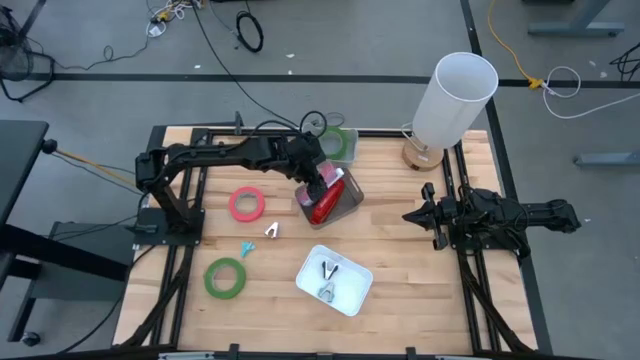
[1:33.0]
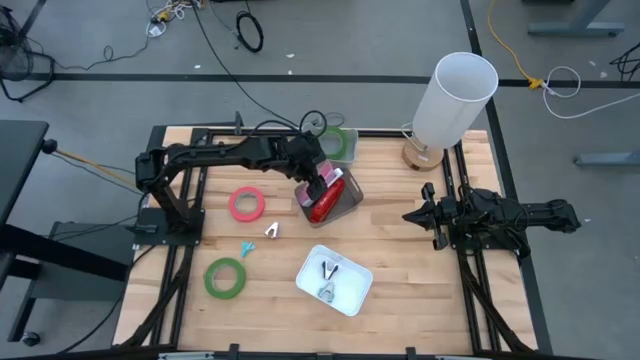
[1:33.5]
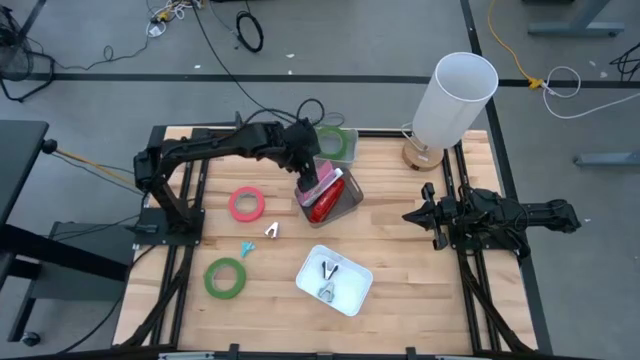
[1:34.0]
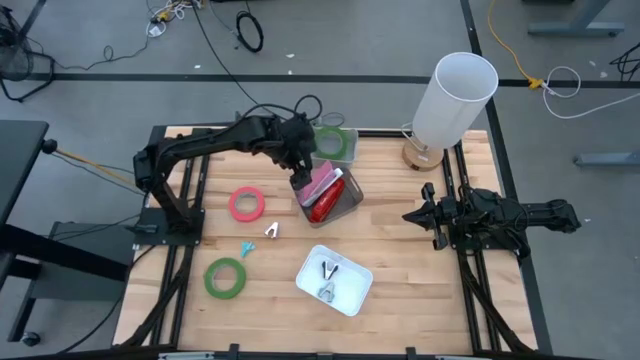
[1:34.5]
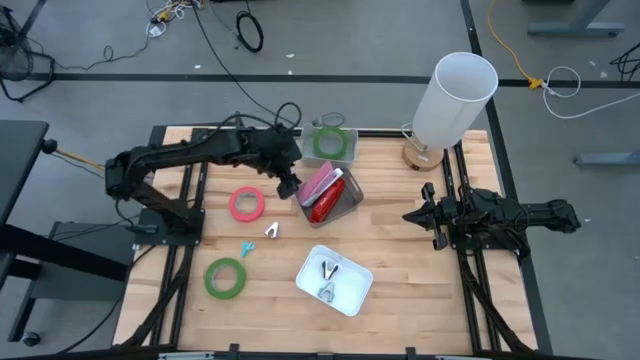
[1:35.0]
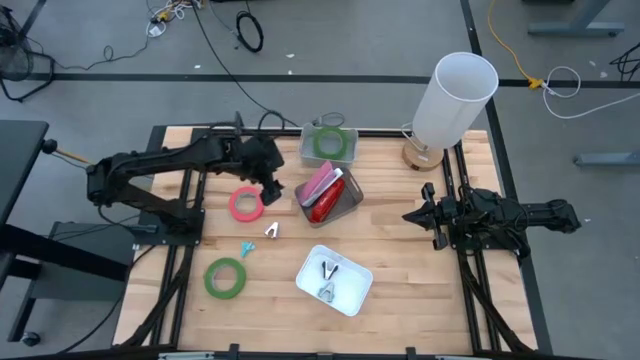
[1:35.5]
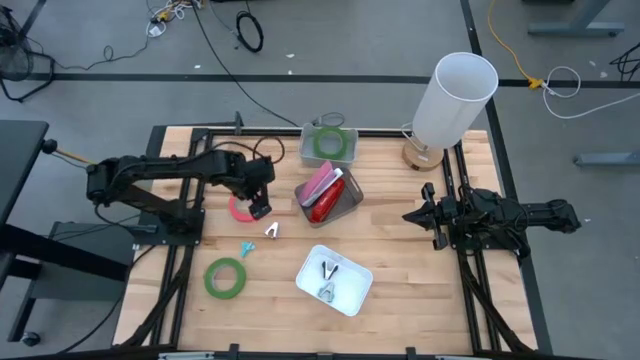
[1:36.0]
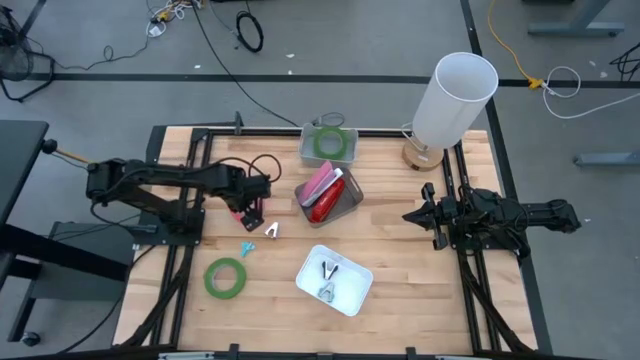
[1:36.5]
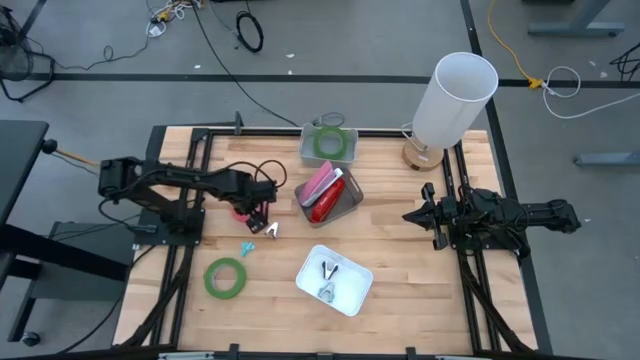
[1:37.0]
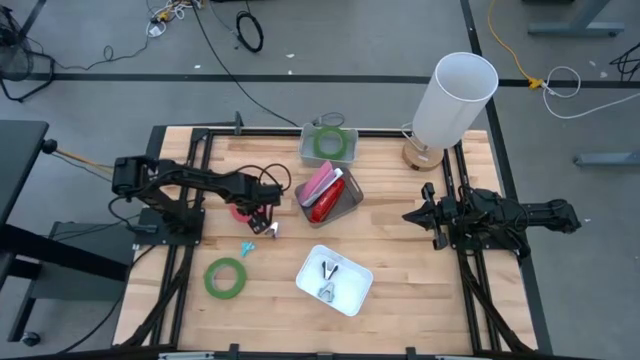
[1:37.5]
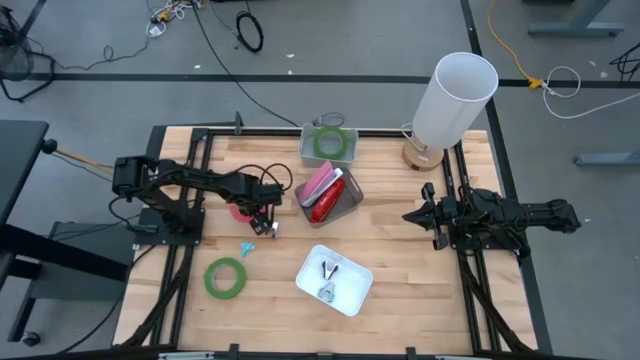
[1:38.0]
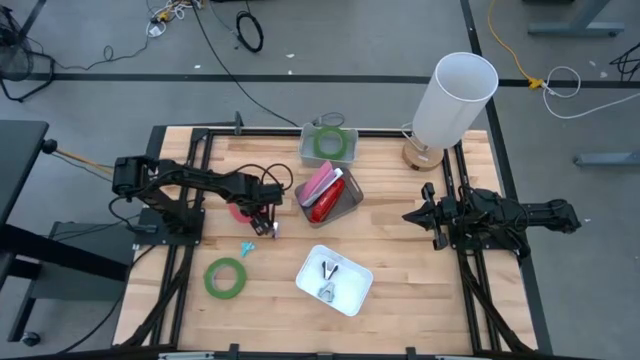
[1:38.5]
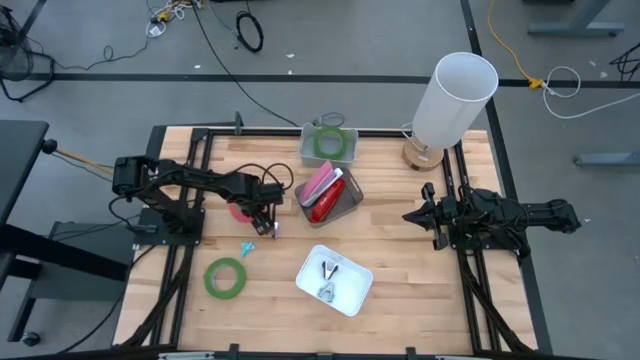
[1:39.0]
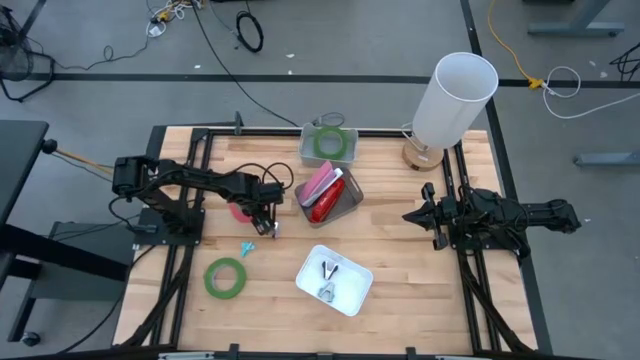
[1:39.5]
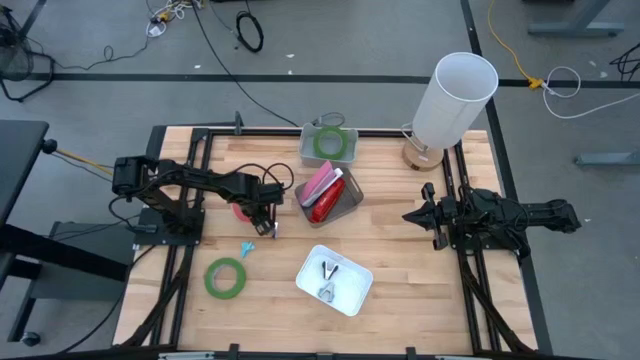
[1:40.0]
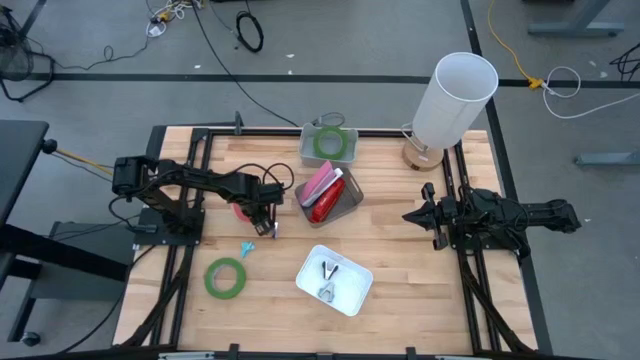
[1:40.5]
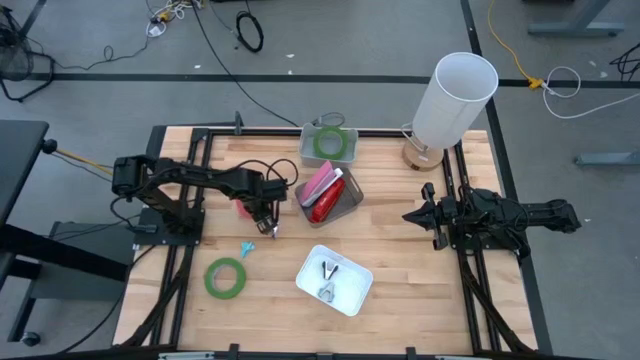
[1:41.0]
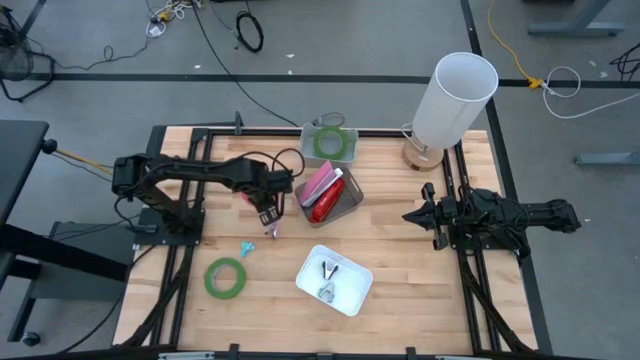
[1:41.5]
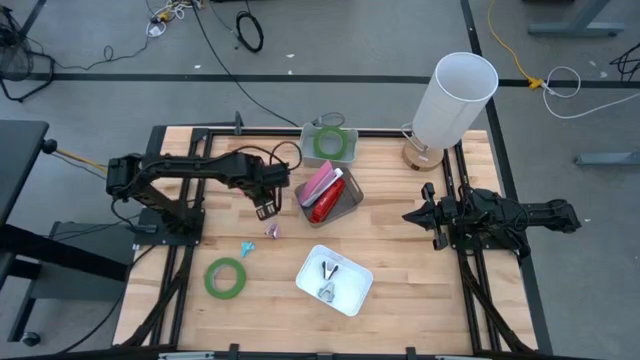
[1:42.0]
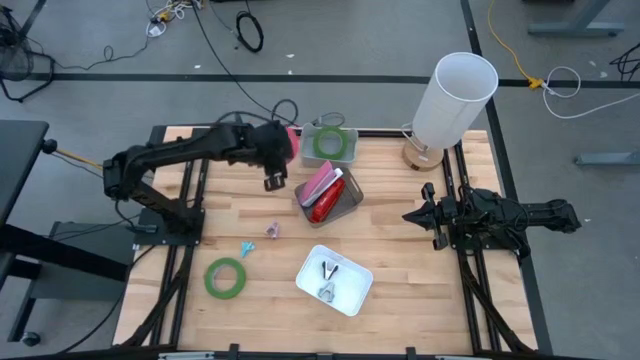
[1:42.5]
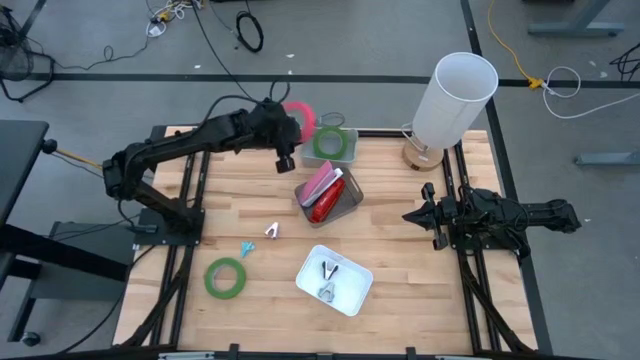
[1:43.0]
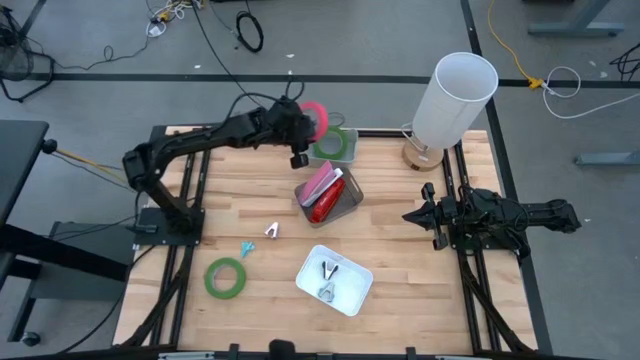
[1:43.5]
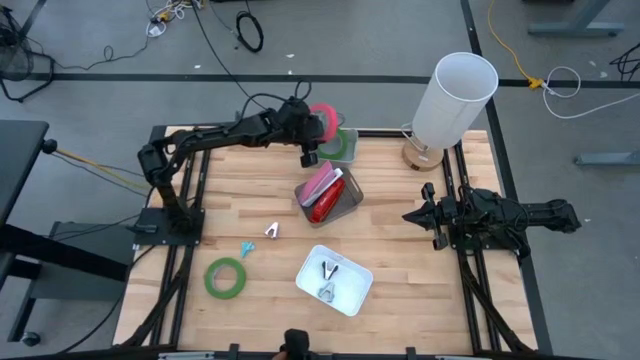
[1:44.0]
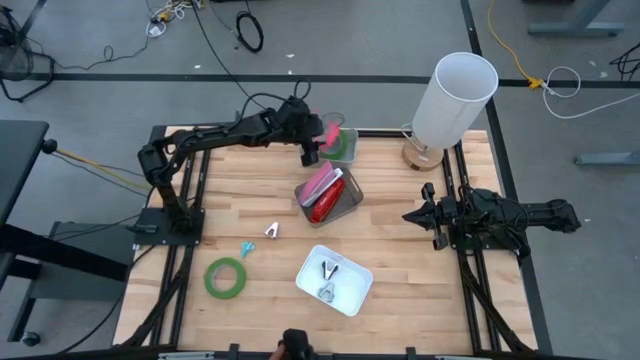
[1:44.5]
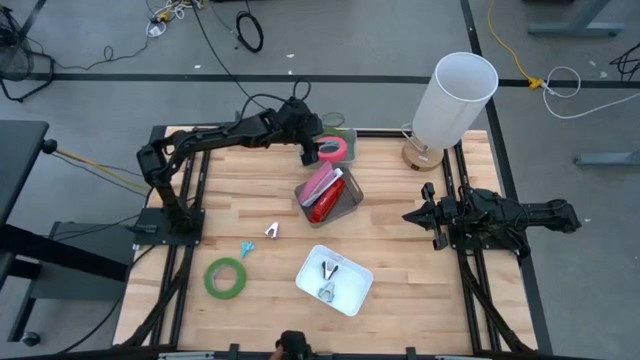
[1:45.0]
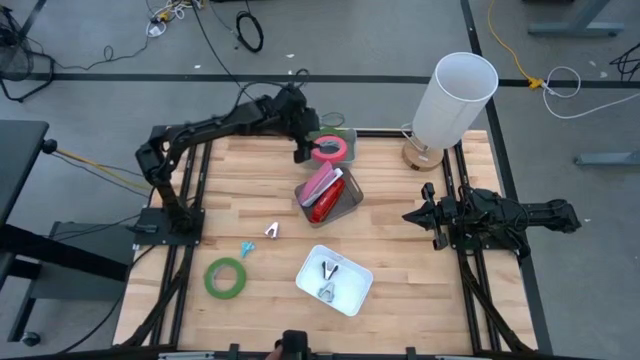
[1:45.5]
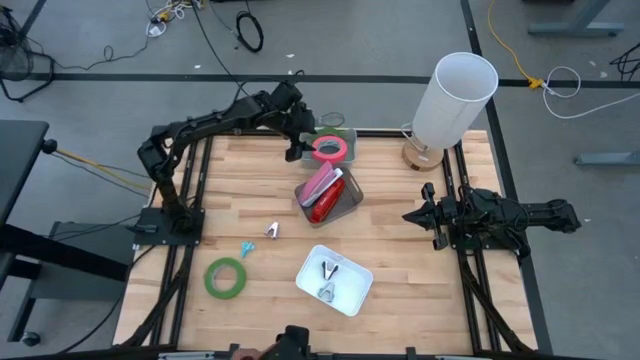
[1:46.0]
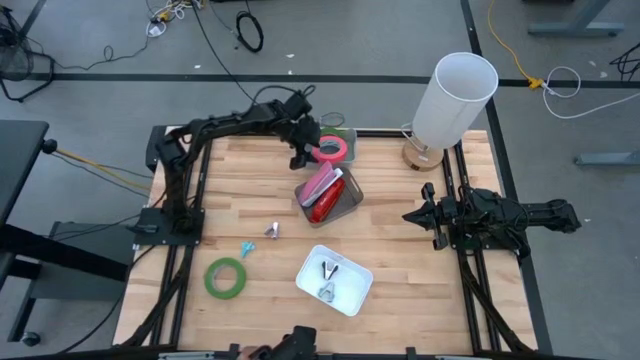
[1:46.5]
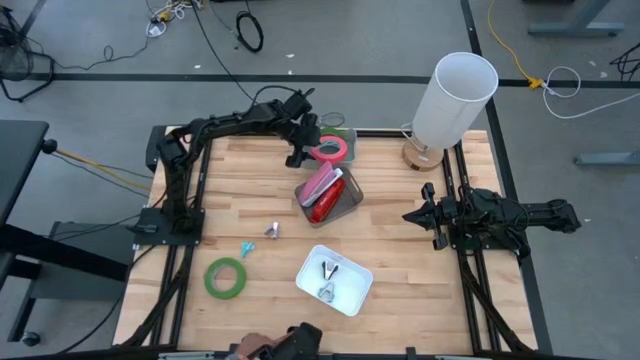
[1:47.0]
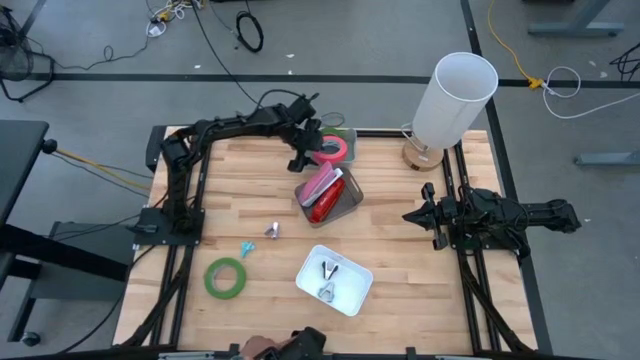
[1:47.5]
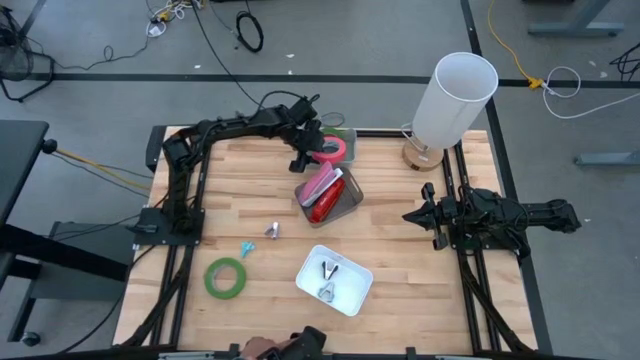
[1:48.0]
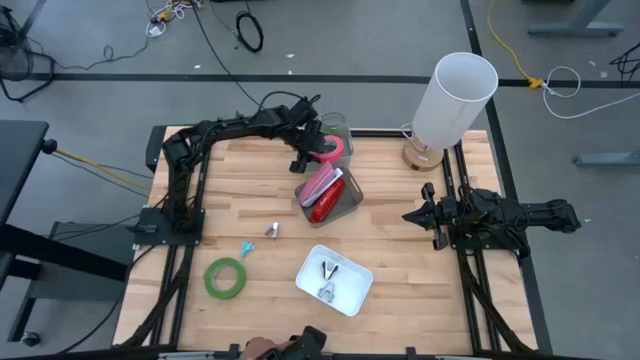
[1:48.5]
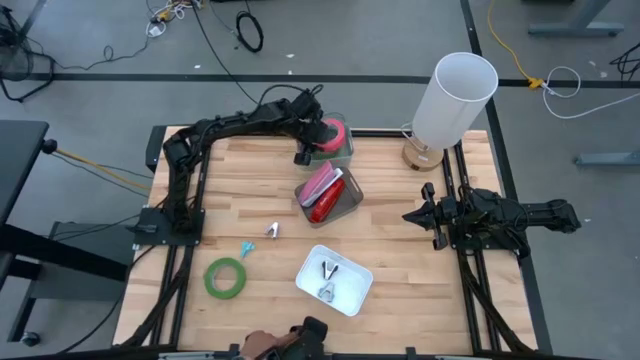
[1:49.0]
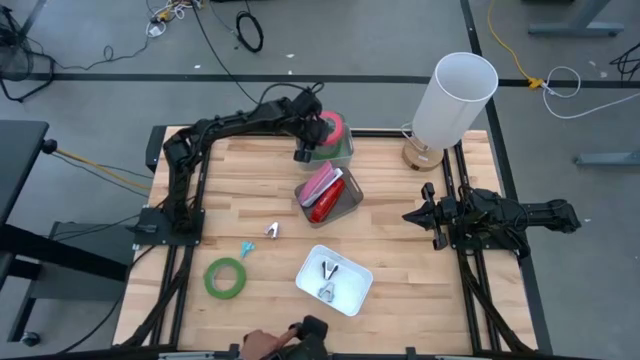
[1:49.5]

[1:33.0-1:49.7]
Task: Pick and place Stapler, Stapler remover, tape
Put the pink tape into the gray bin

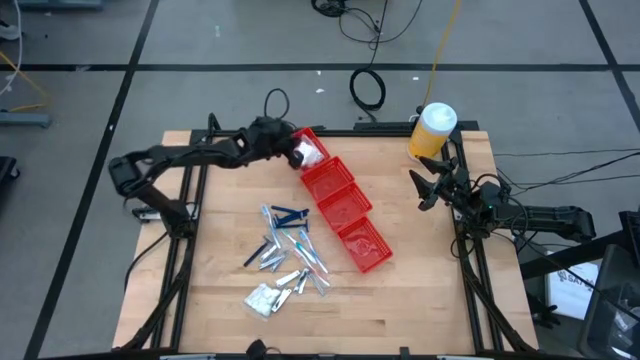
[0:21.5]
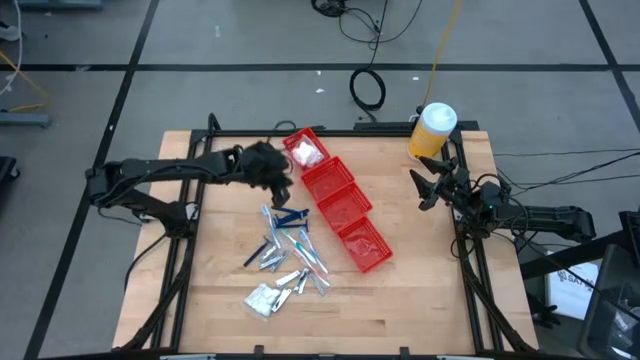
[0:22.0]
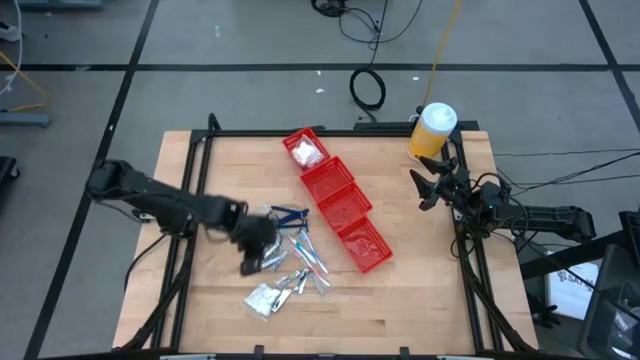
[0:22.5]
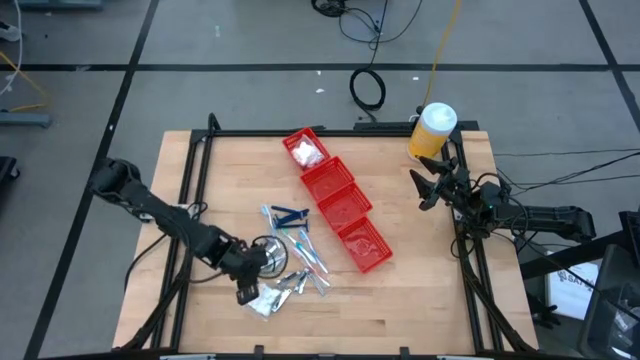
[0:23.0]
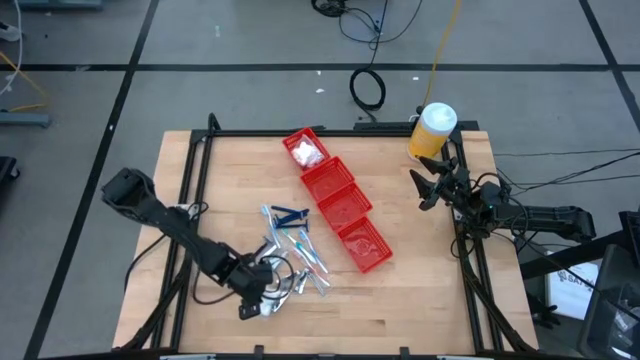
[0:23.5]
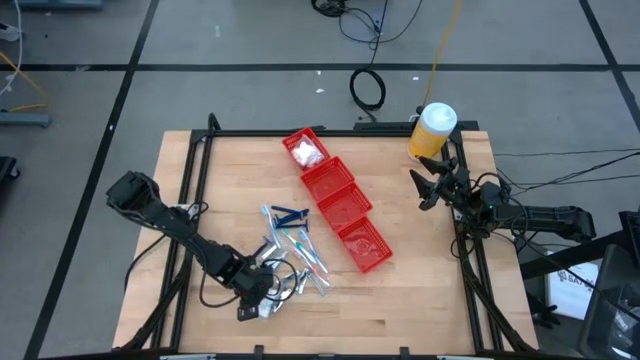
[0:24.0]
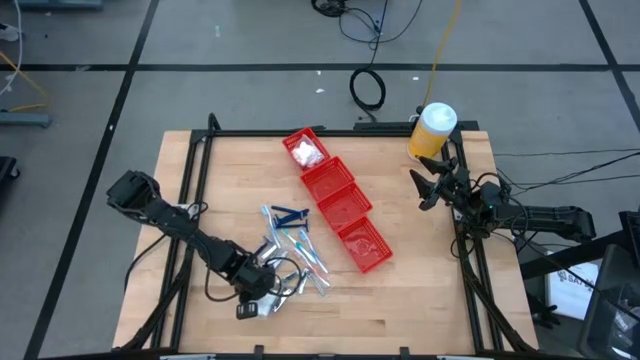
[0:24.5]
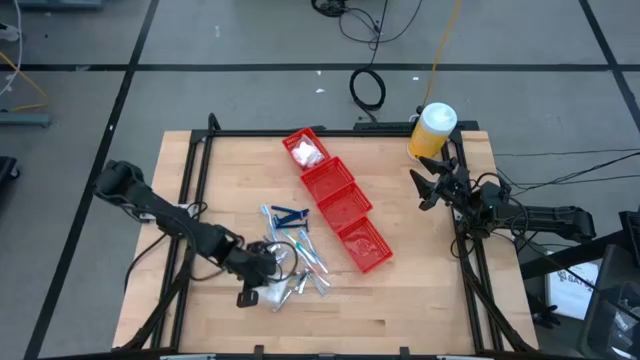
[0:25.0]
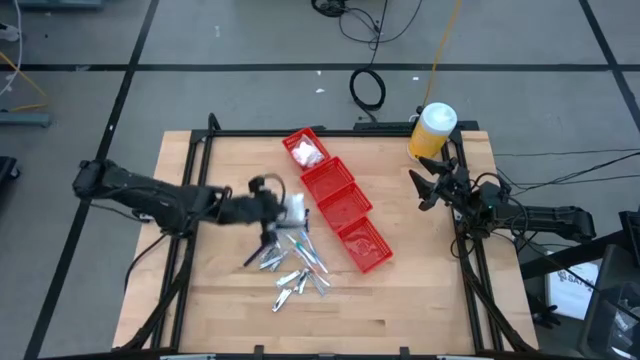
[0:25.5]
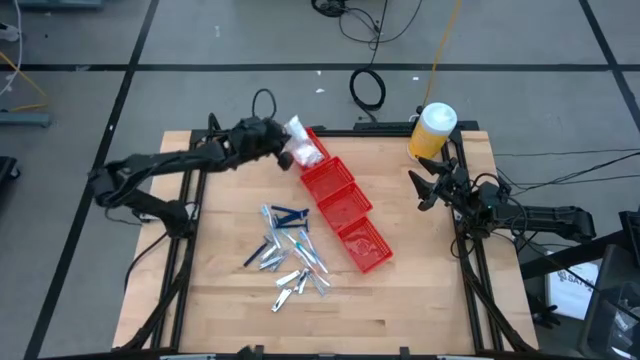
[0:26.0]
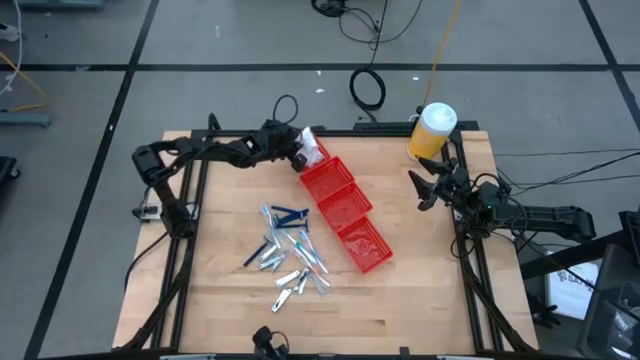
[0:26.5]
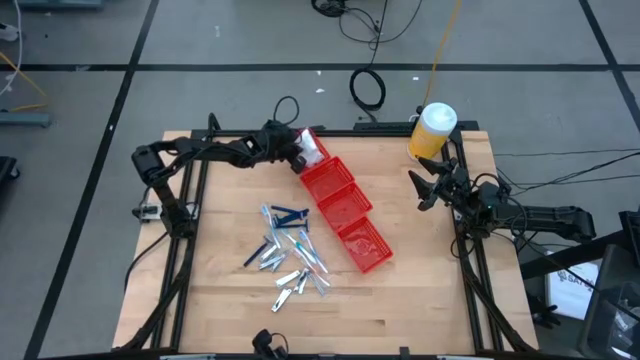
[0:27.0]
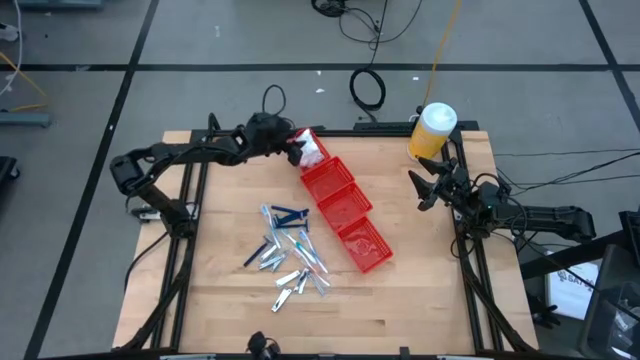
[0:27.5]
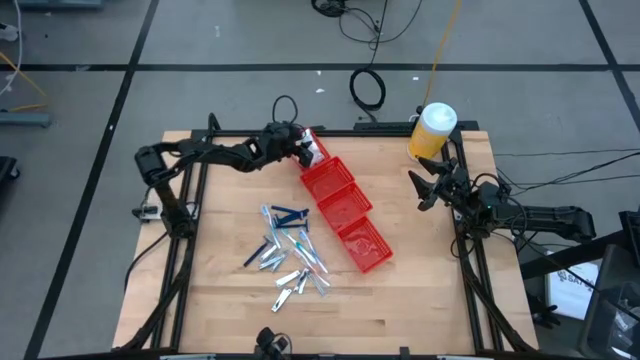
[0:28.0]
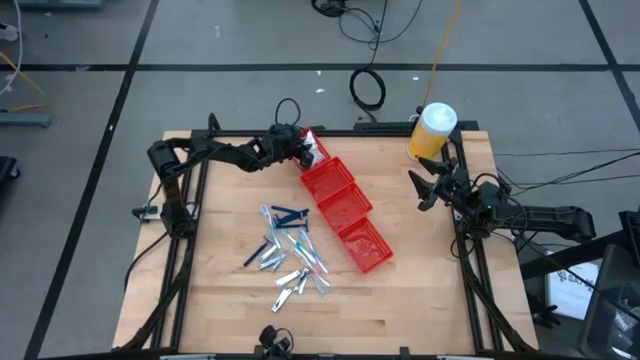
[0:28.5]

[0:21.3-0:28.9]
Task: Pick & Place Travel size toiletries
Put the white cotton pack into the top red bin
